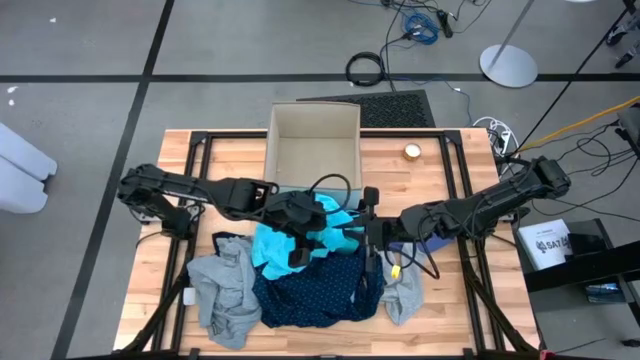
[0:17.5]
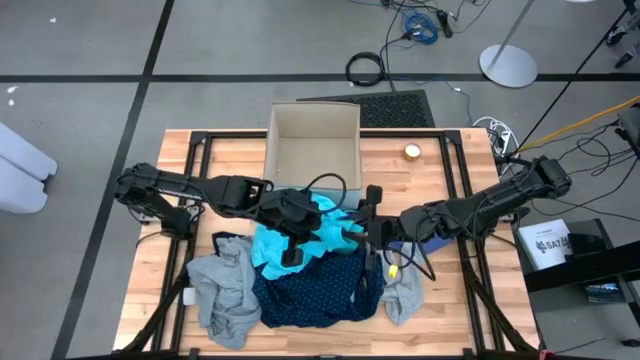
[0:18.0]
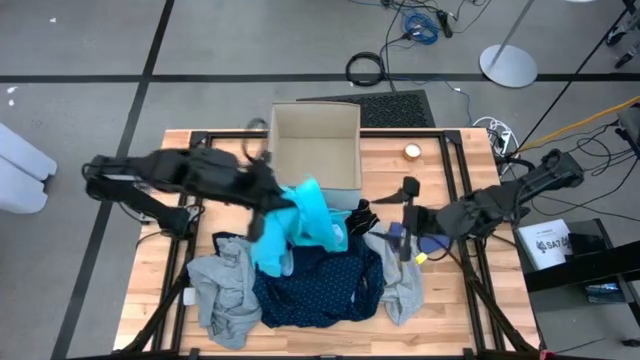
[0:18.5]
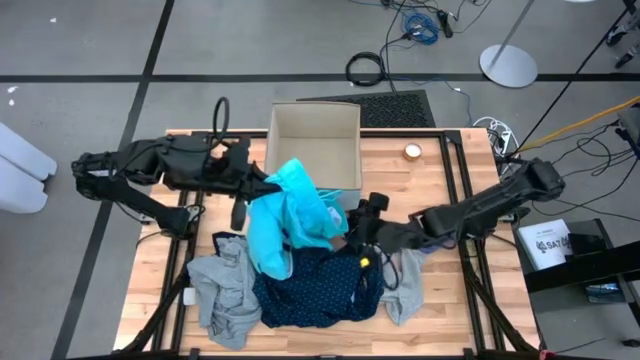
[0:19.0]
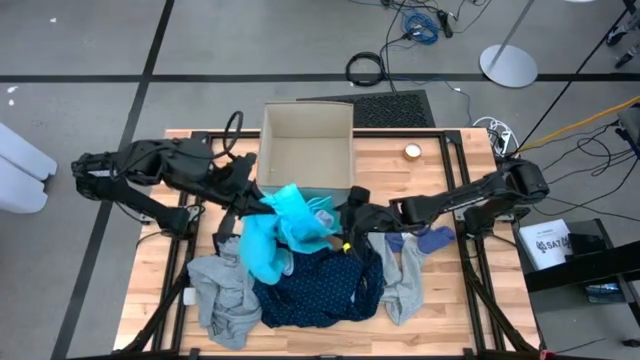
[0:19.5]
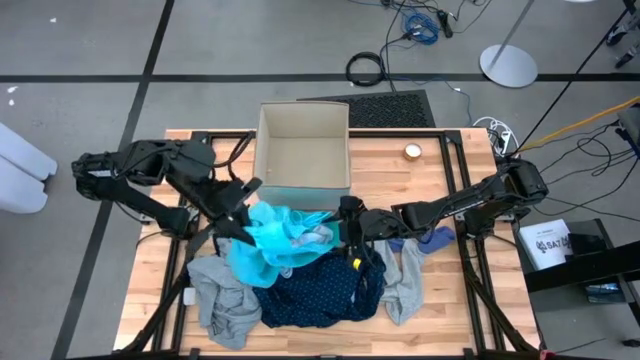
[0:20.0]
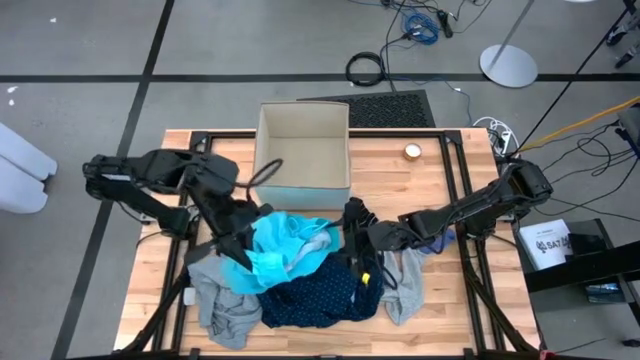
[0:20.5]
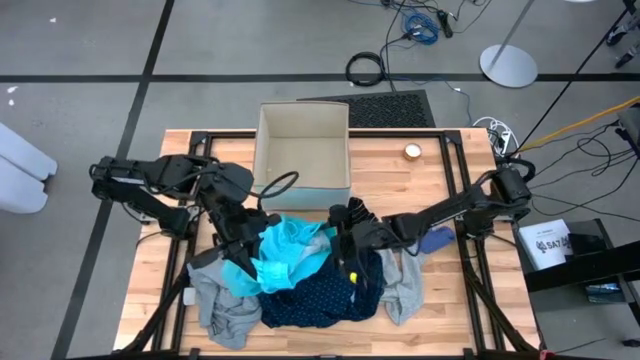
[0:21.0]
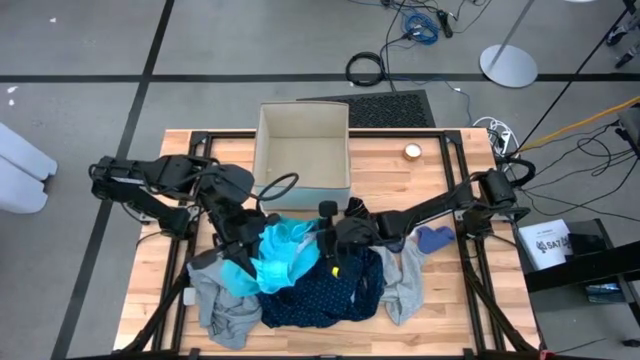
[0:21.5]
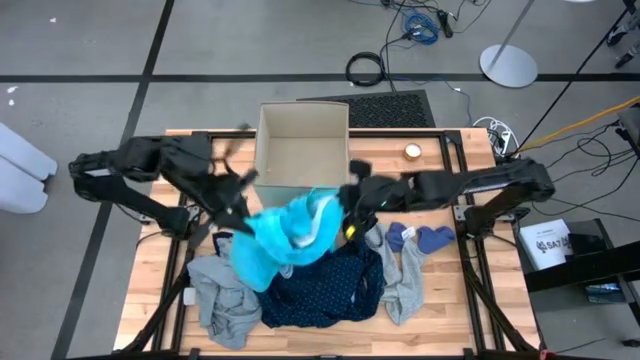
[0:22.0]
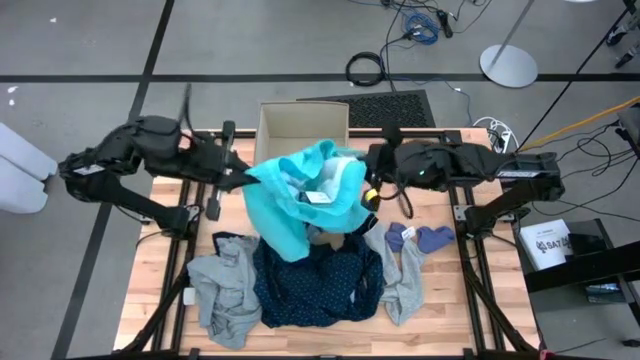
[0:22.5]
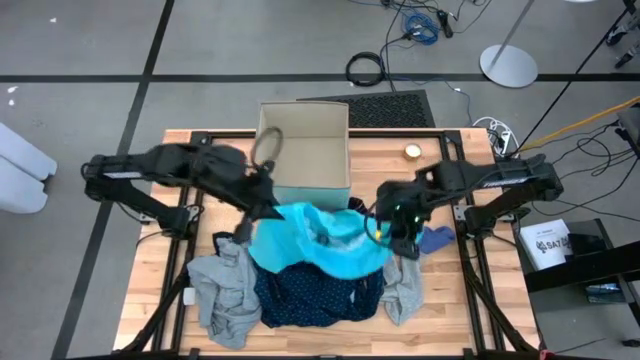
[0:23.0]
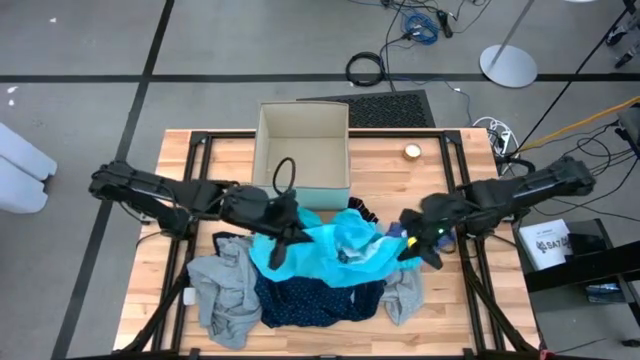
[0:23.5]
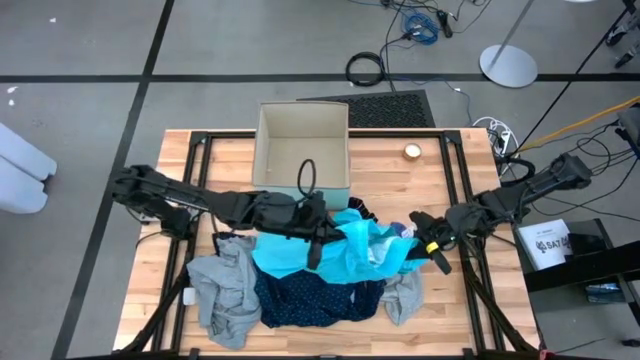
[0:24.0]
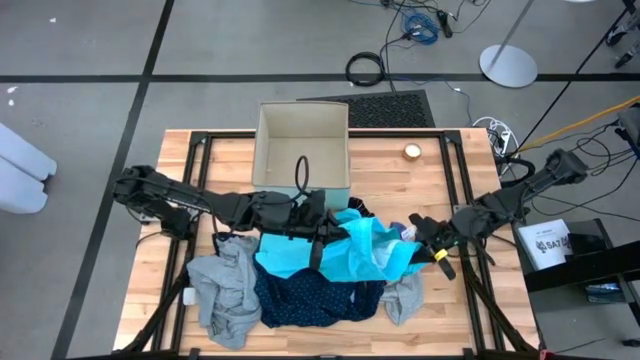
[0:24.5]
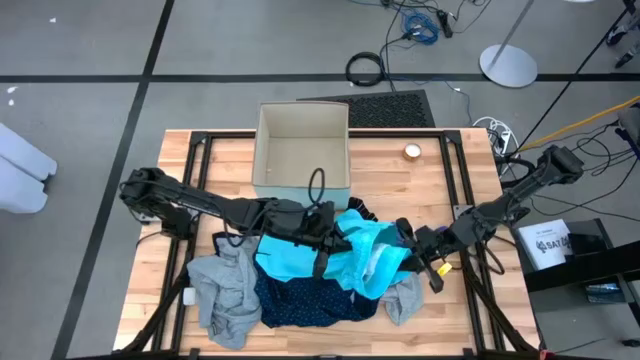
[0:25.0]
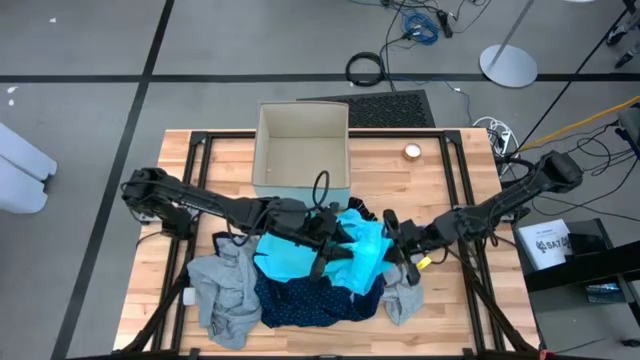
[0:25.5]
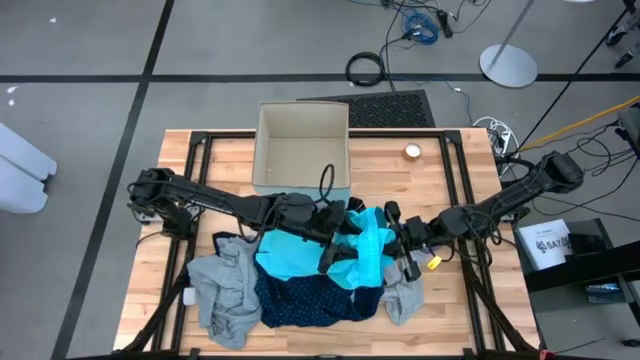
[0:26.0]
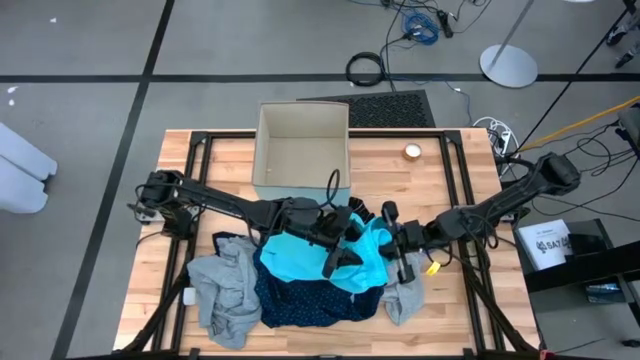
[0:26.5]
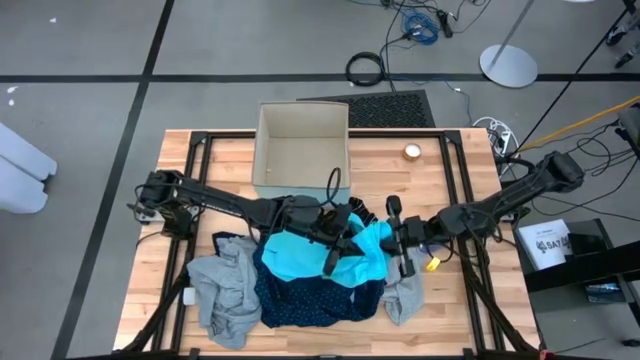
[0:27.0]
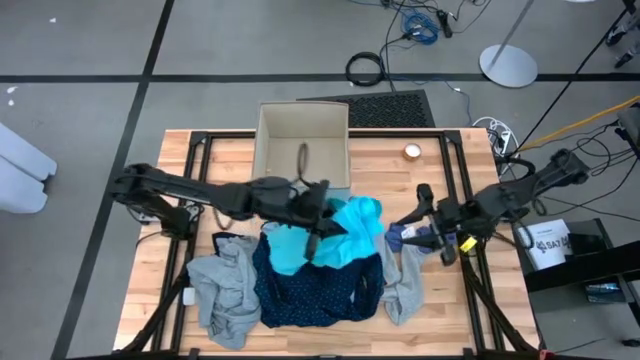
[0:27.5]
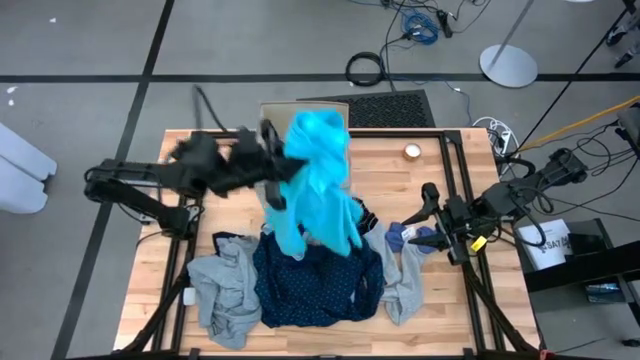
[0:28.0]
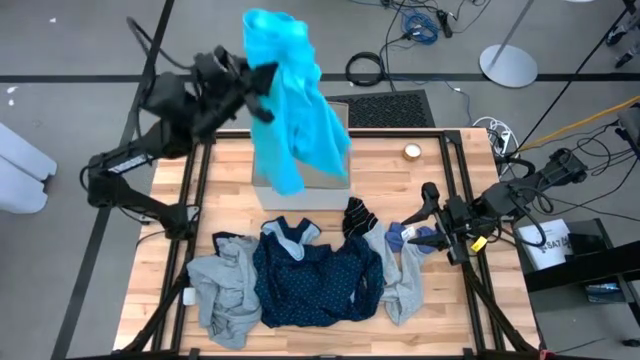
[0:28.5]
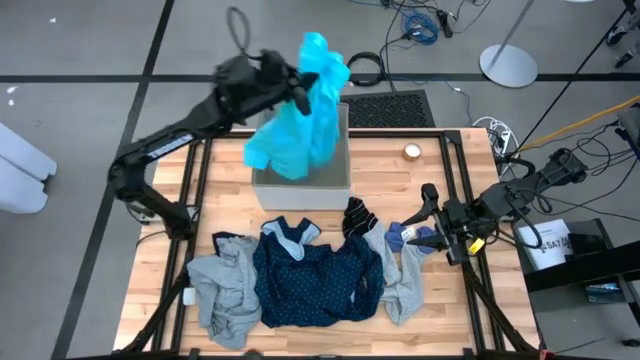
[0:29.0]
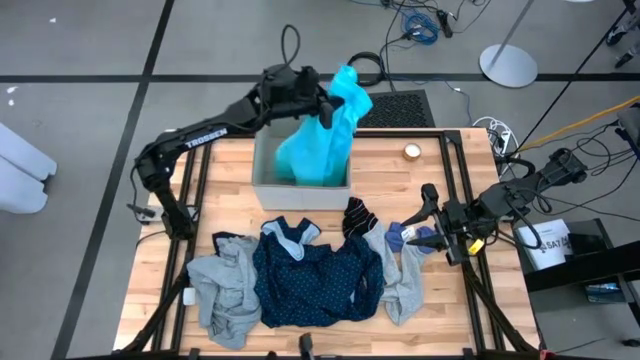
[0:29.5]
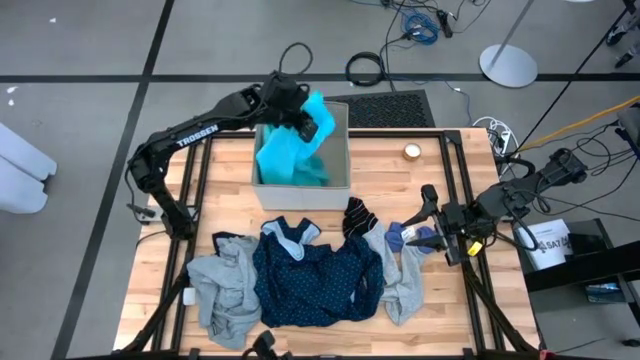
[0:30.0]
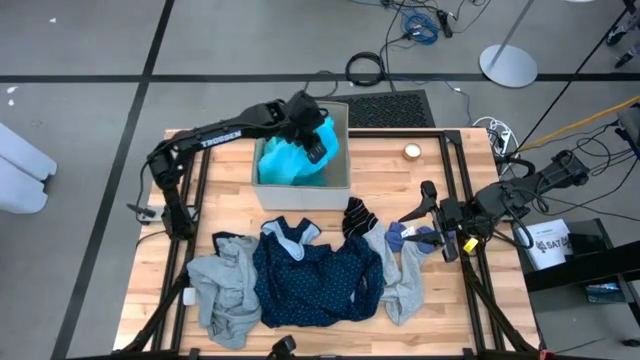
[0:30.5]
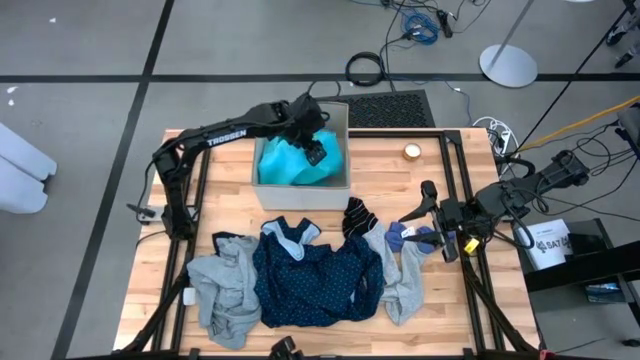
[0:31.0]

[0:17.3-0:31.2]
Task: Sort clothes
Put the light blue shorts into the white laundry organizer
